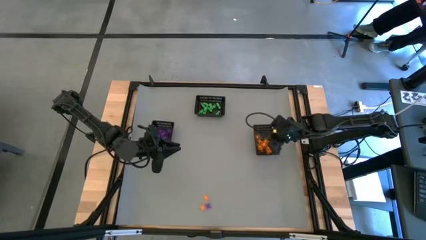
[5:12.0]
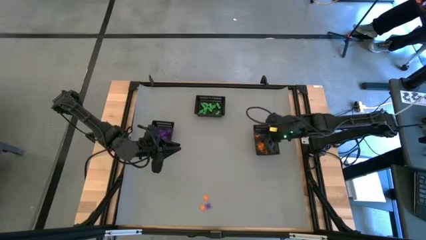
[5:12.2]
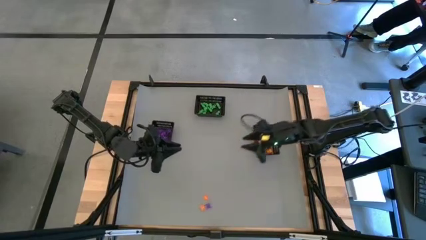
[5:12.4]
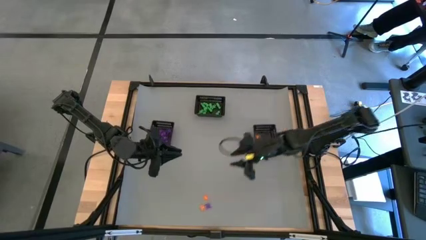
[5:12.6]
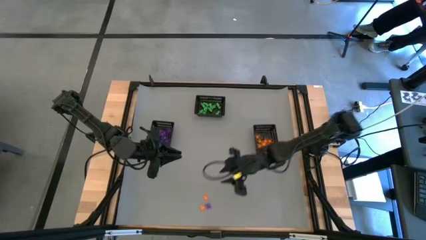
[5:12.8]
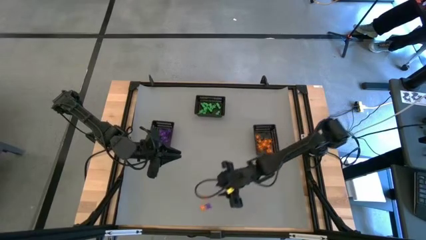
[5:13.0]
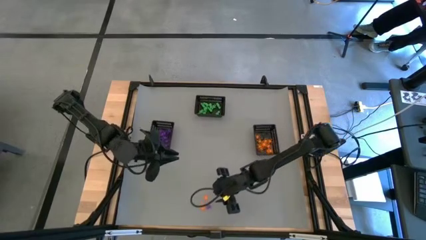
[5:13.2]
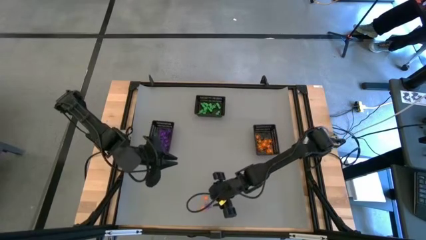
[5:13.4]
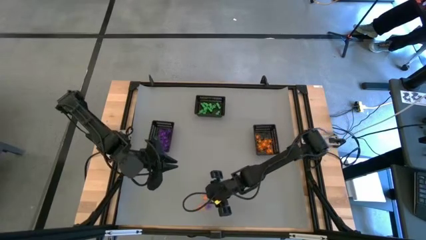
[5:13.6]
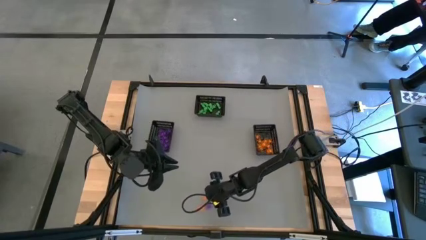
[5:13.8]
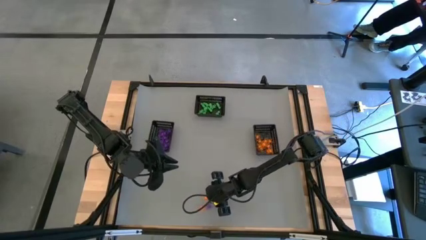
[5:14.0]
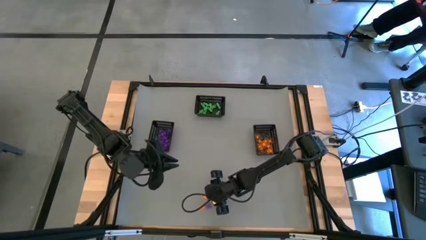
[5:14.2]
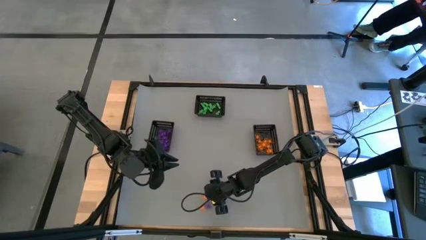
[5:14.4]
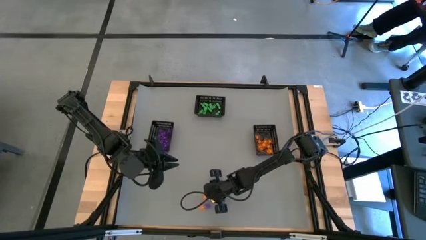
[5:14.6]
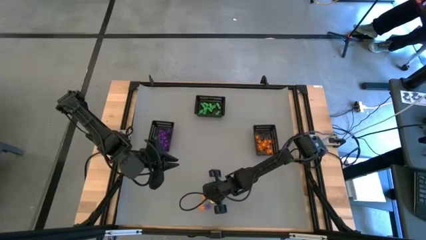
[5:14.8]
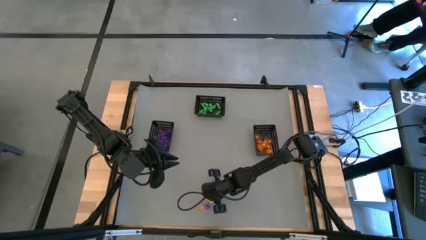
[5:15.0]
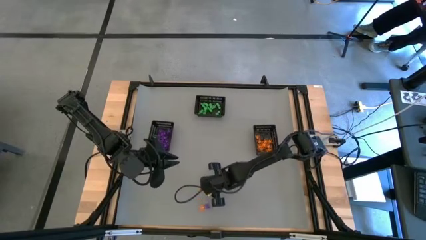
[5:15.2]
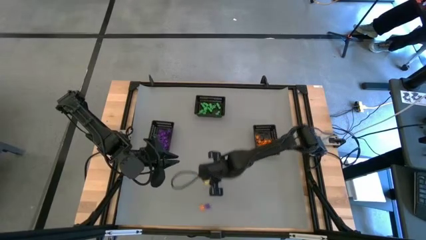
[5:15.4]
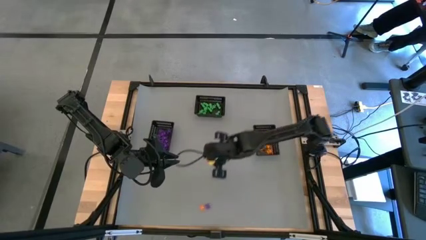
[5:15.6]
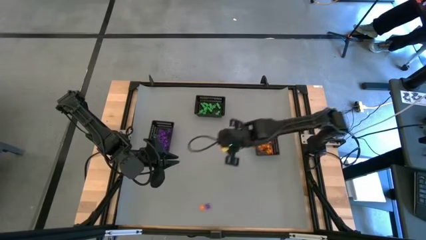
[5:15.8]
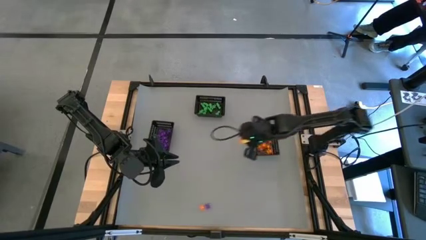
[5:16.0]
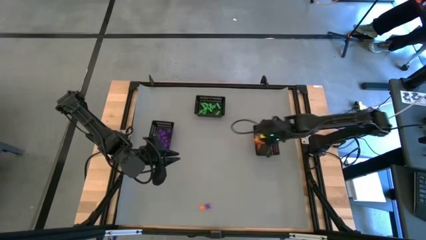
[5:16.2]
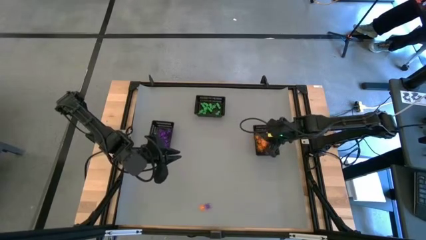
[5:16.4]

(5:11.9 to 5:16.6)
Task: Sort Halloween decoration
Put the top orange spider toy into the right bin

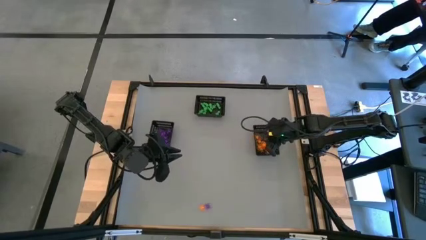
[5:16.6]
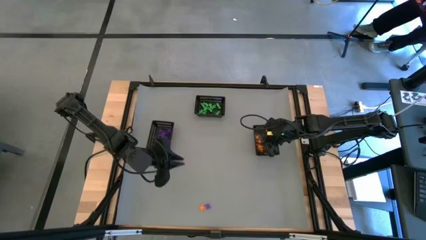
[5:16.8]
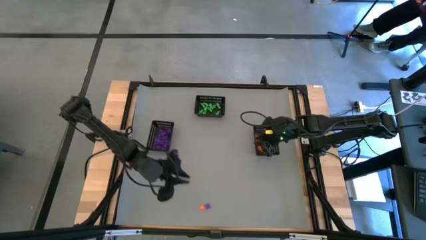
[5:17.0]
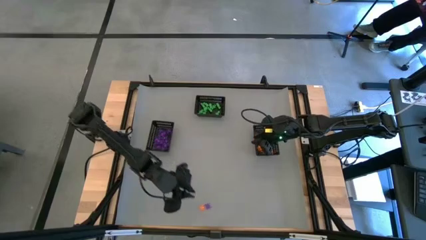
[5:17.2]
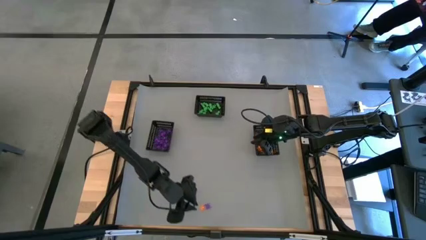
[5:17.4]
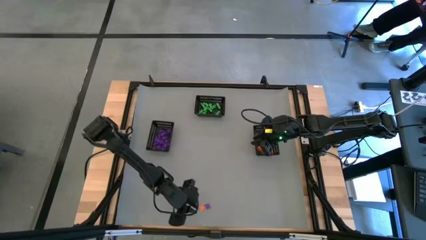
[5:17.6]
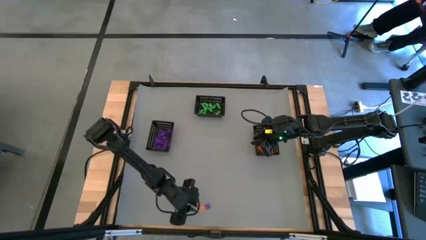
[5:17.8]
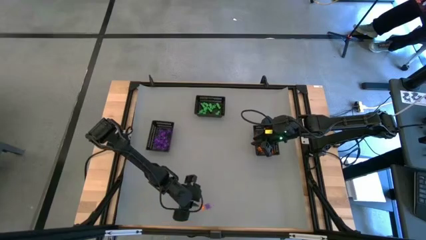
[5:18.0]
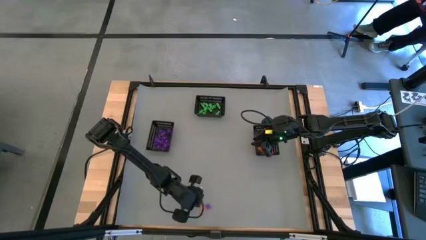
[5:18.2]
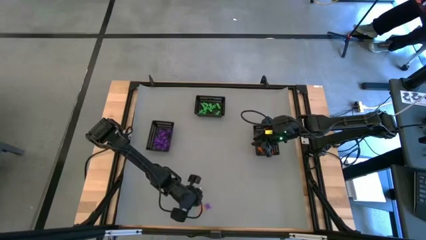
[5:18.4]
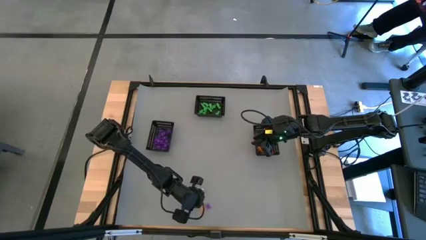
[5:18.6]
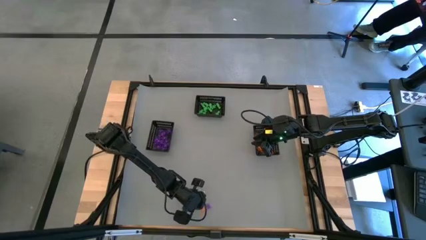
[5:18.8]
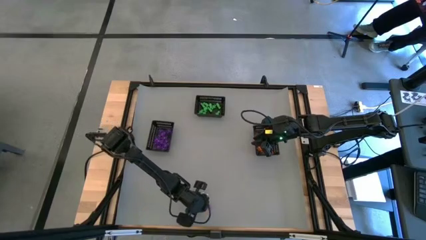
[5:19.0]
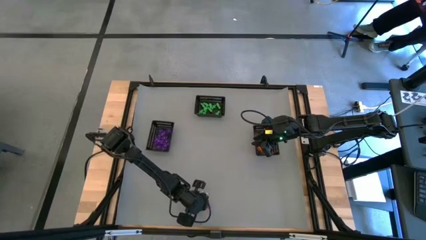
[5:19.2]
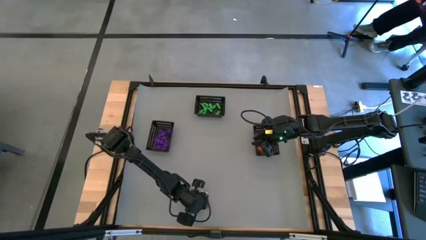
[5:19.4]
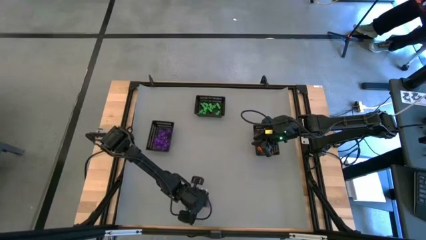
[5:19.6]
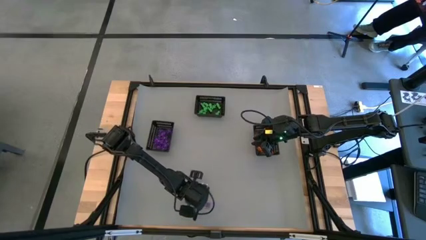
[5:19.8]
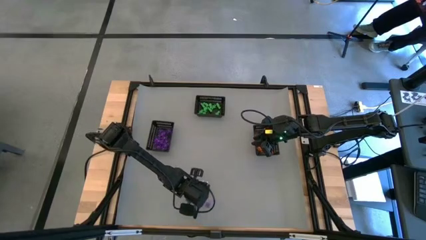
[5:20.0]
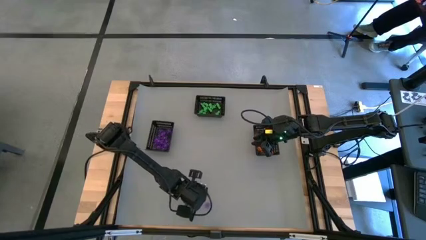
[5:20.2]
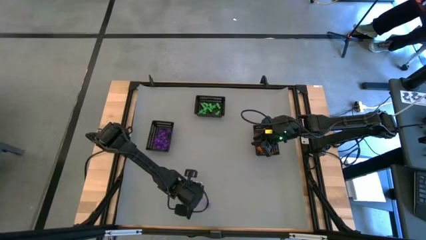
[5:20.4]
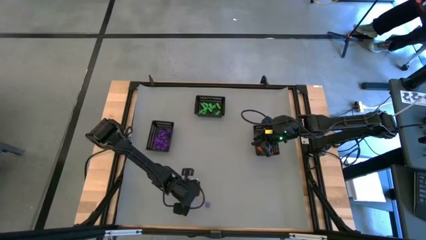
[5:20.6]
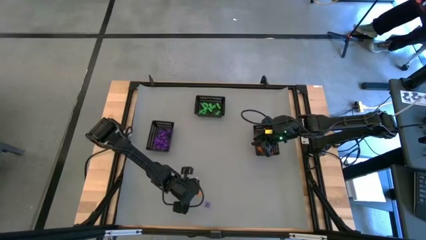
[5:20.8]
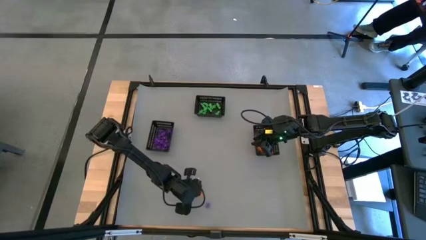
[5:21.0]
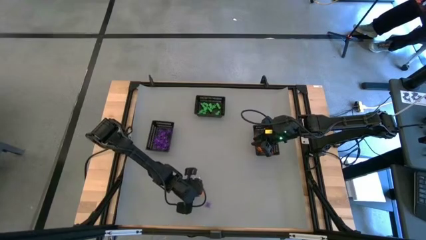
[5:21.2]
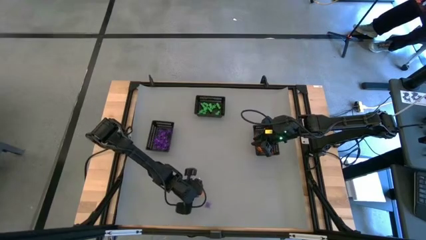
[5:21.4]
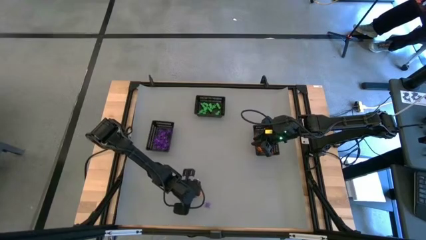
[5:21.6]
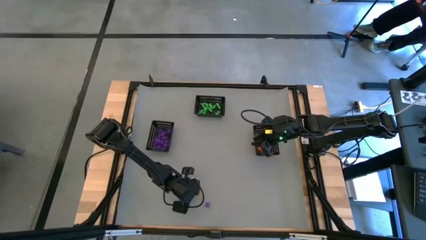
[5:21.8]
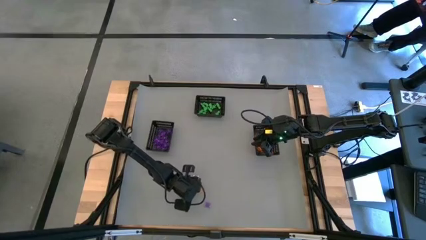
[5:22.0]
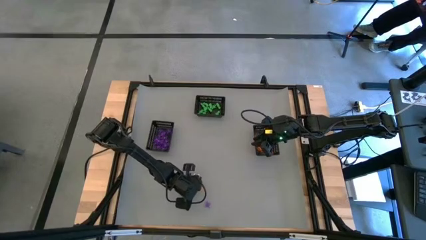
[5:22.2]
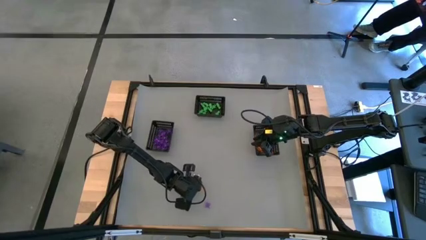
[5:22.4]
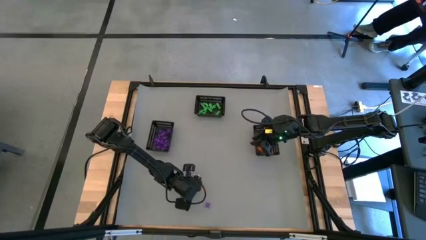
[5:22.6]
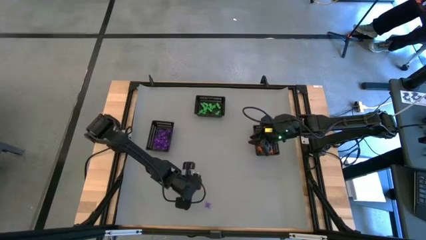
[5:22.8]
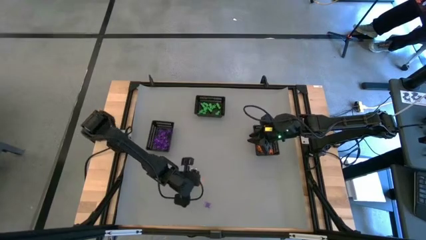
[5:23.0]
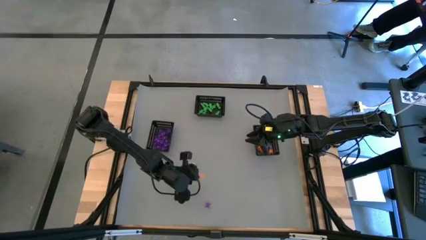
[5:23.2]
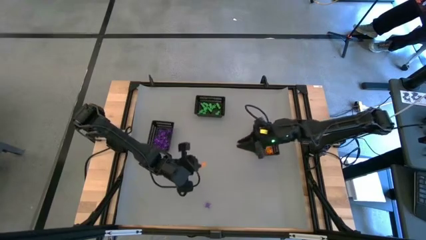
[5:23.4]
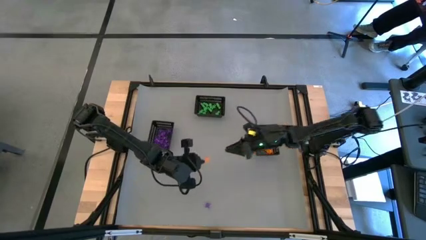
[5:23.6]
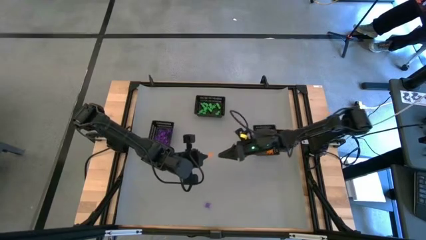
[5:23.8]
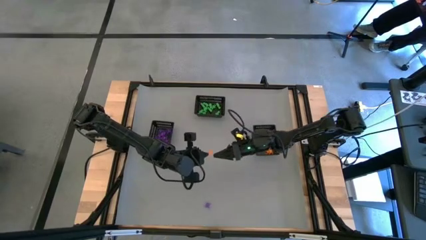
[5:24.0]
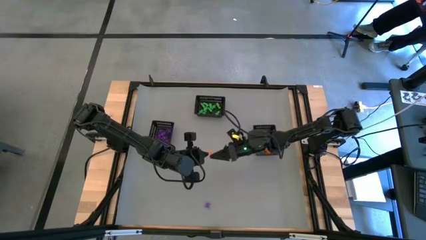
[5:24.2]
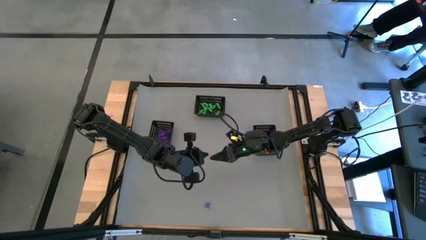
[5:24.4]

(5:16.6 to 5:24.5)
Put the orange spider toy into the right bin

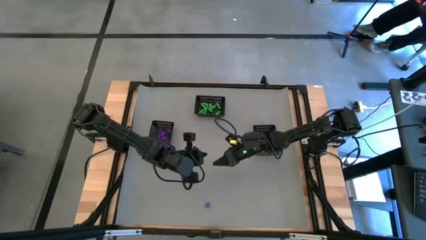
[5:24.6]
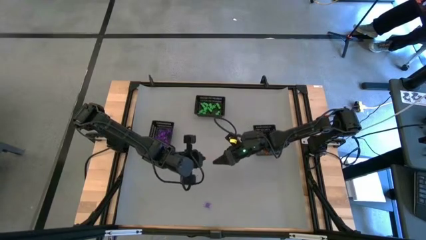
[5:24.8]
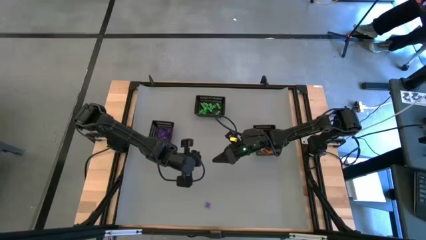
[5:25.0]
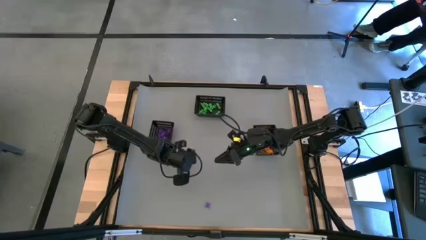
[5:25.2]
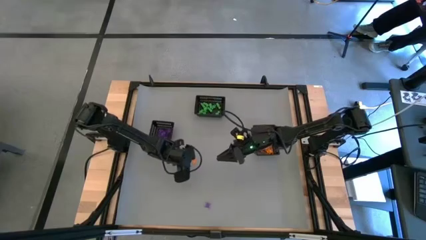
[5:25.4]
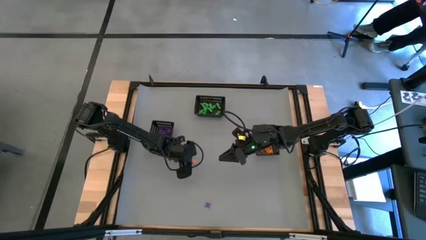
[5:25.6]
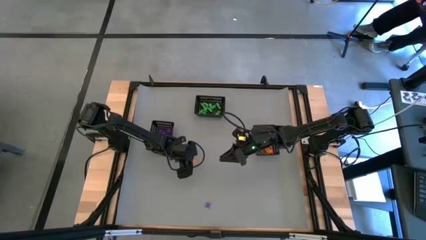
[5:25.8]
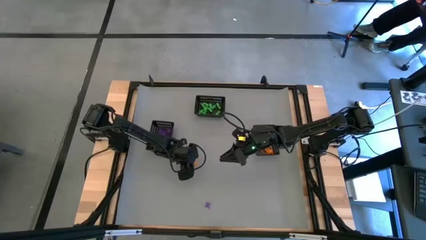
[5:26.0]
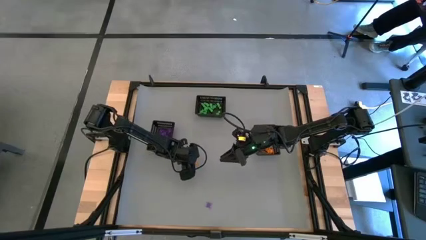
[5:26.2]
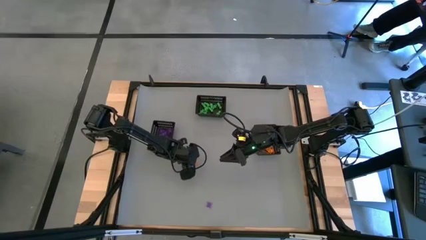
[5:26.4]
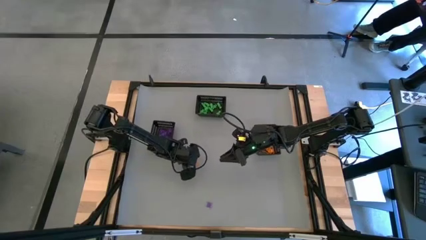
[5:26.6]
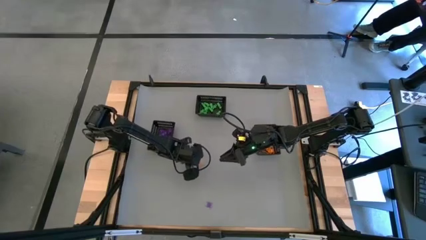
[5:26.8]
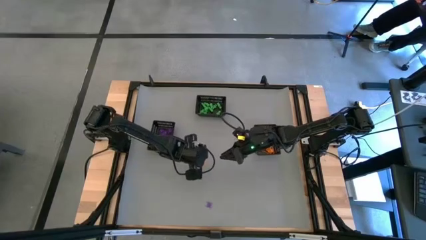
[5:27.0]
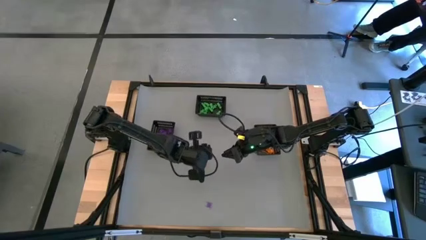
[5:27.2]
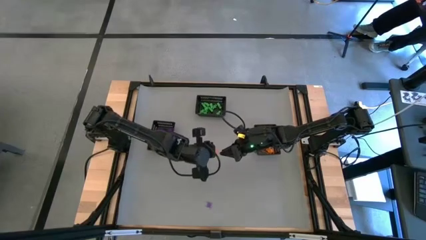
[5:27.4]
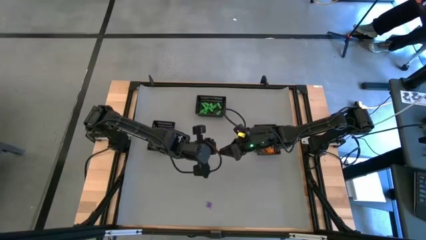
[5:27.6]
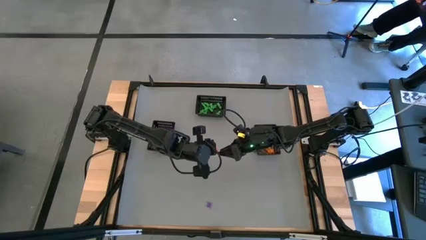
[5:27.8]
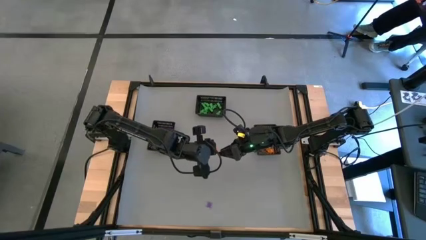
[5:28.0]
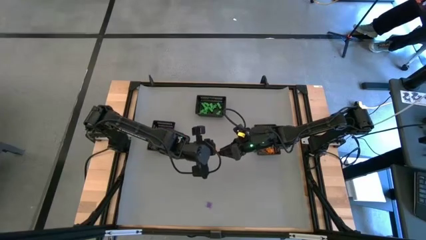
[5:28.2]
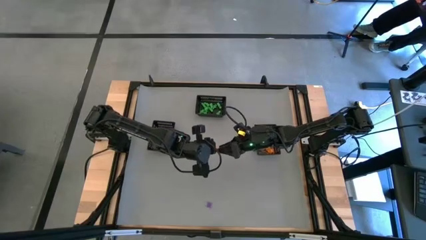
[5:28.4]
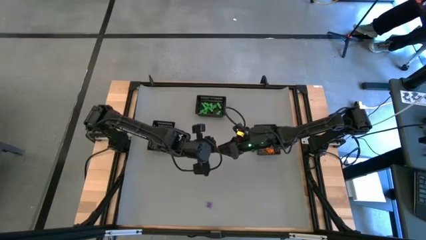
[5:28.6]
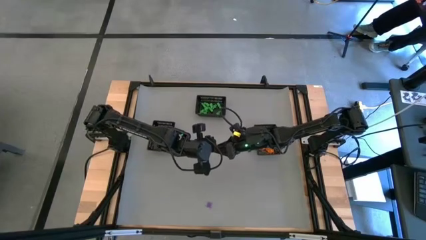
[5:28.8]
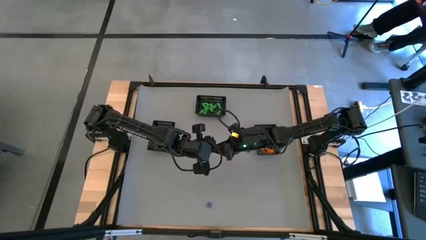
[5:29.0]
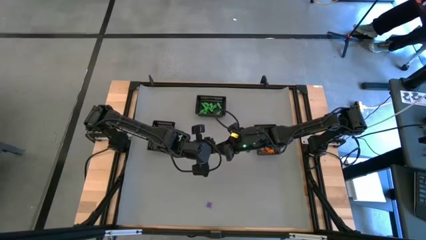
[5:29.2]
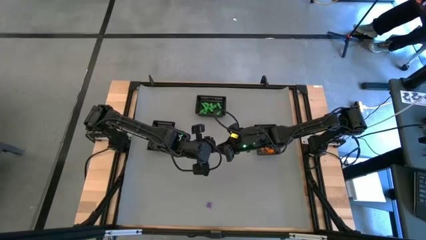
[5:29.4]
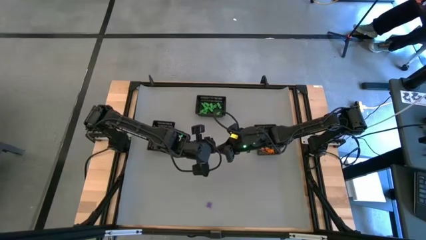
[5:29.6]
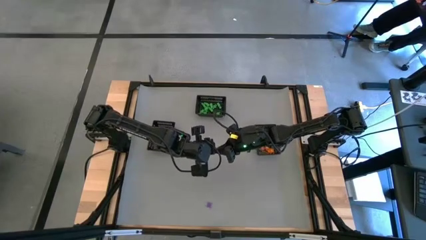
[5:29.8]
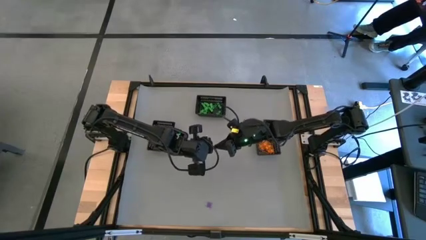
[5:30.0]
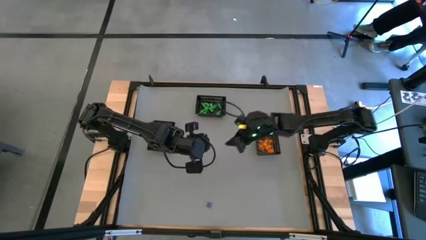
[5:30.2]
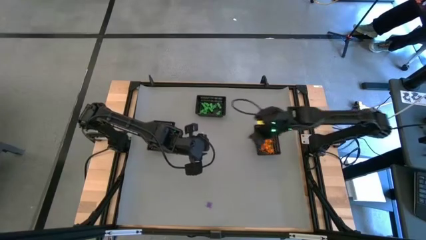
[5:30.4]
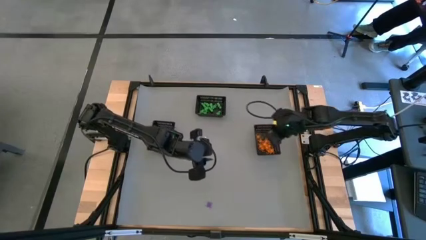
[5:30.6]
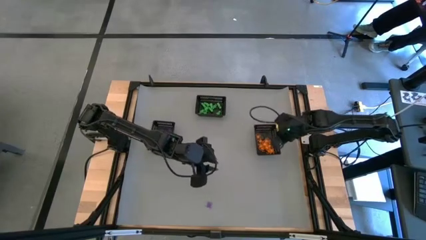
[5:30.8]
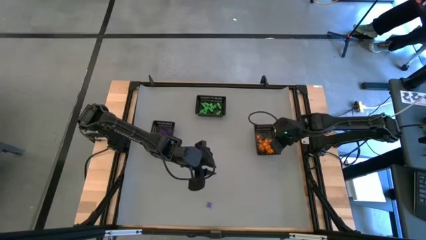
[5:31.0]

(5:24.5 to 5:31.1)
Put the orange spider toy into the right bin
